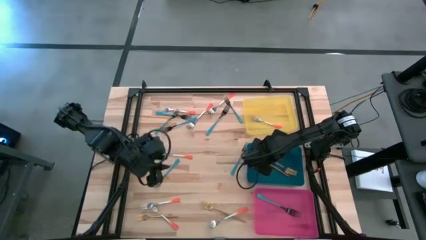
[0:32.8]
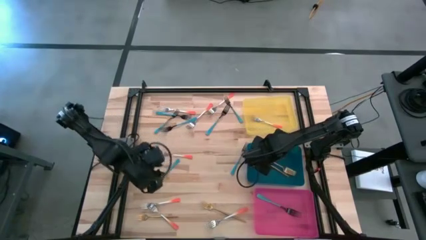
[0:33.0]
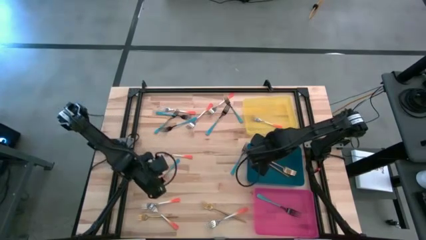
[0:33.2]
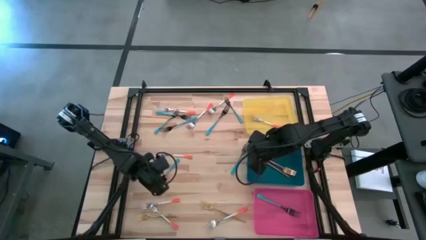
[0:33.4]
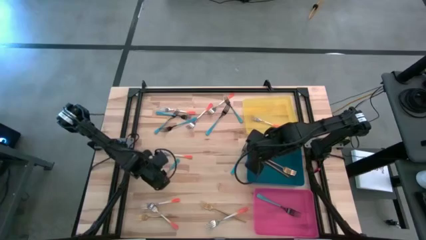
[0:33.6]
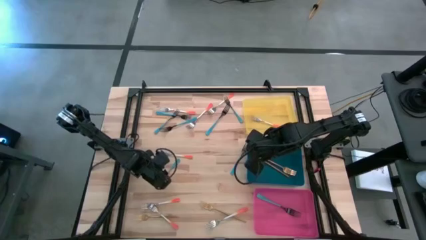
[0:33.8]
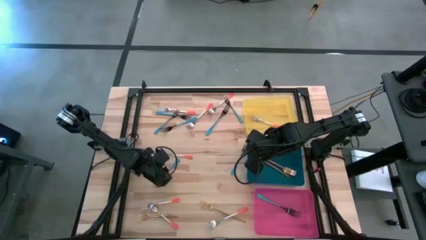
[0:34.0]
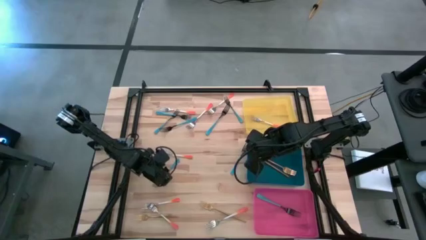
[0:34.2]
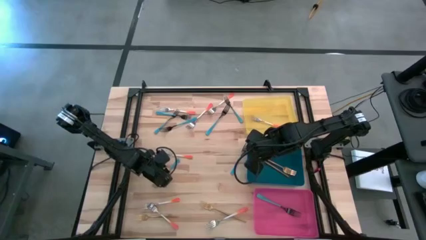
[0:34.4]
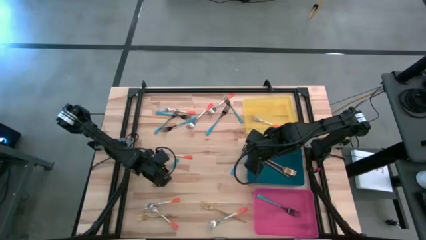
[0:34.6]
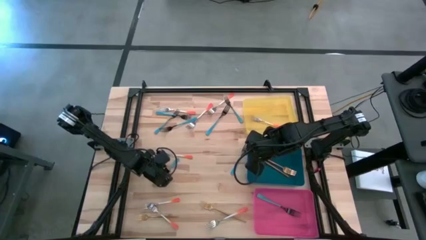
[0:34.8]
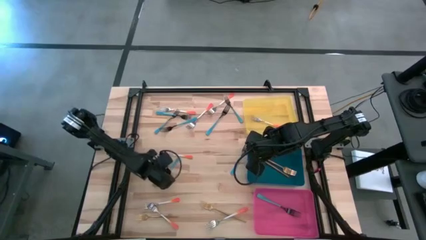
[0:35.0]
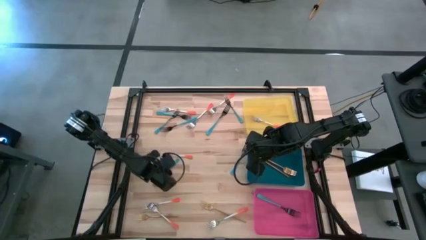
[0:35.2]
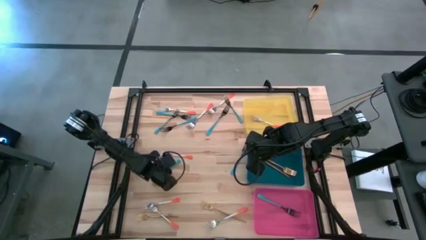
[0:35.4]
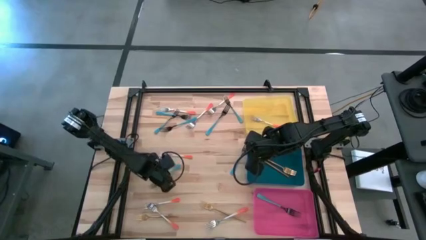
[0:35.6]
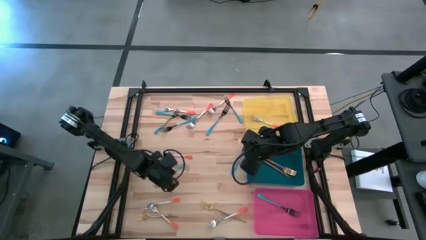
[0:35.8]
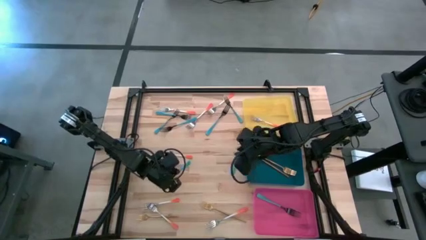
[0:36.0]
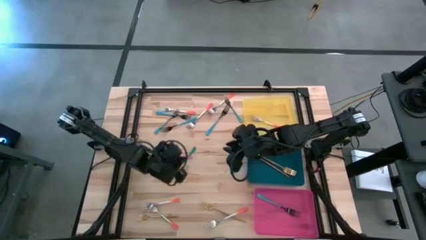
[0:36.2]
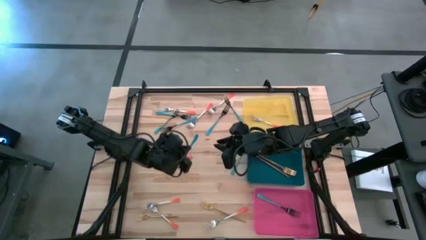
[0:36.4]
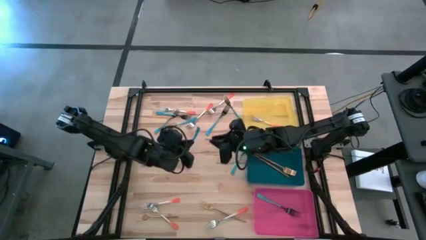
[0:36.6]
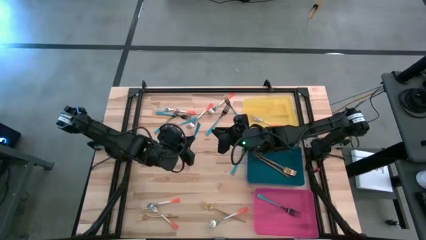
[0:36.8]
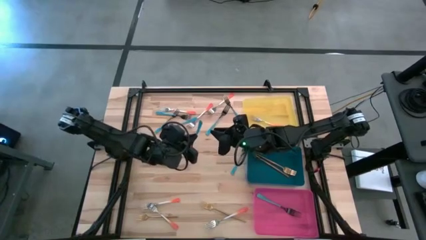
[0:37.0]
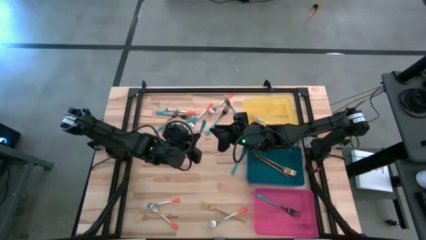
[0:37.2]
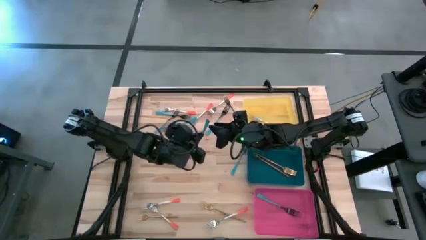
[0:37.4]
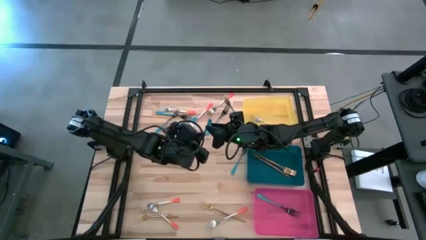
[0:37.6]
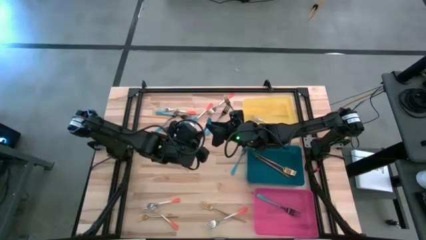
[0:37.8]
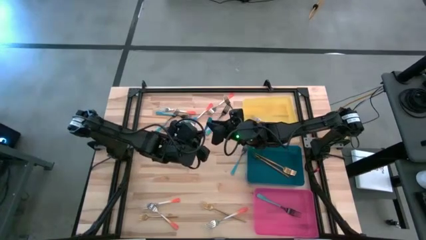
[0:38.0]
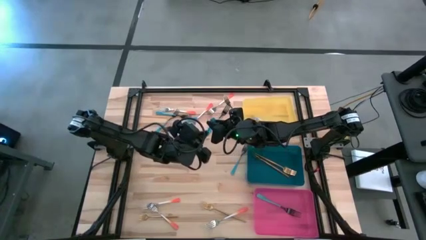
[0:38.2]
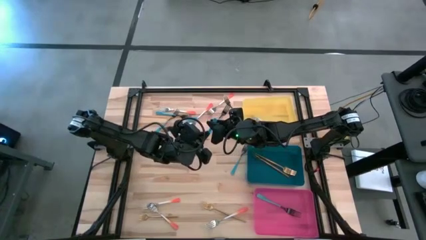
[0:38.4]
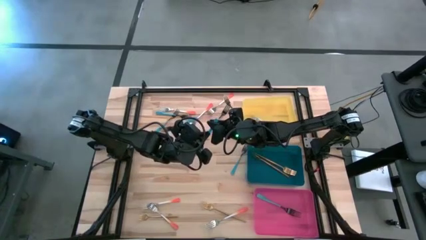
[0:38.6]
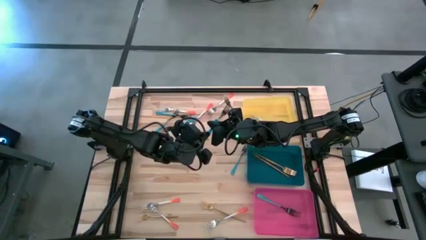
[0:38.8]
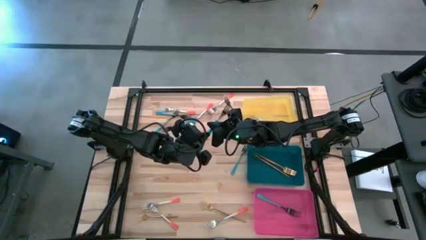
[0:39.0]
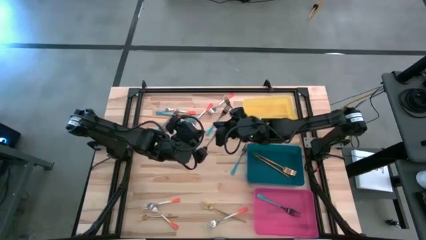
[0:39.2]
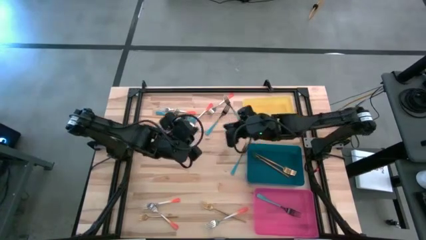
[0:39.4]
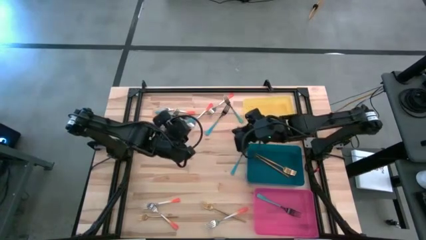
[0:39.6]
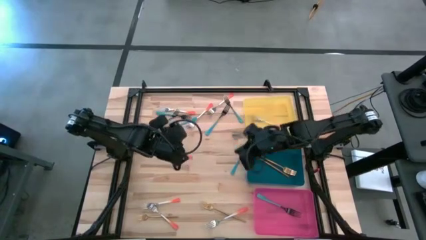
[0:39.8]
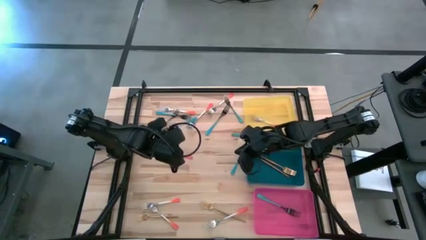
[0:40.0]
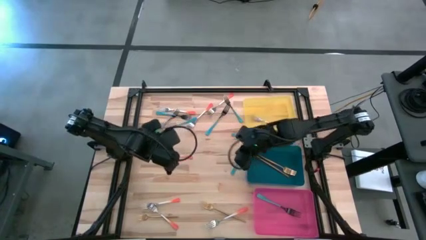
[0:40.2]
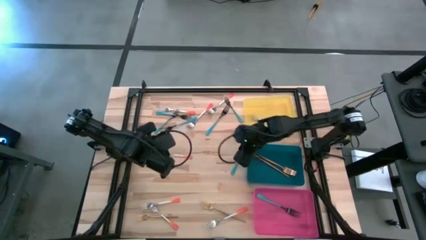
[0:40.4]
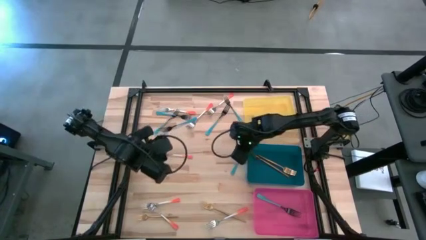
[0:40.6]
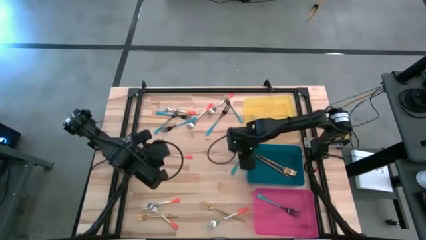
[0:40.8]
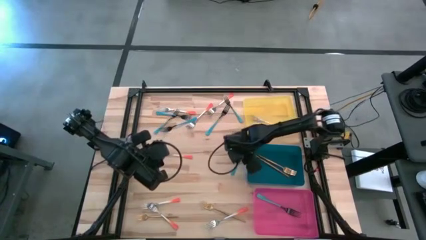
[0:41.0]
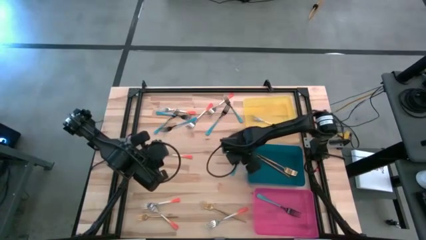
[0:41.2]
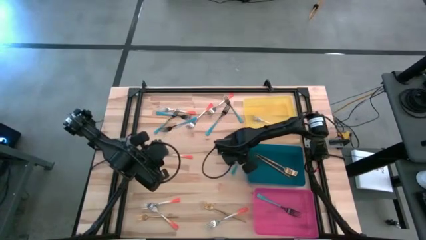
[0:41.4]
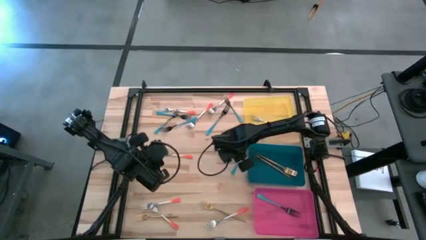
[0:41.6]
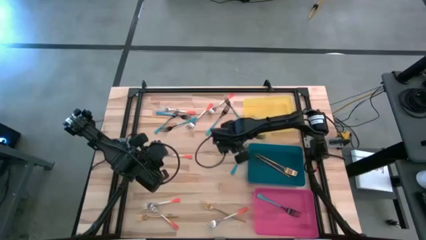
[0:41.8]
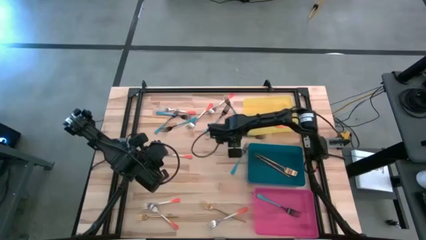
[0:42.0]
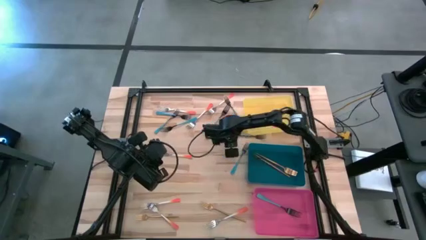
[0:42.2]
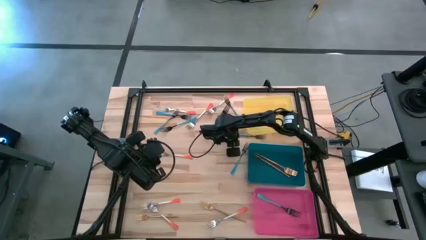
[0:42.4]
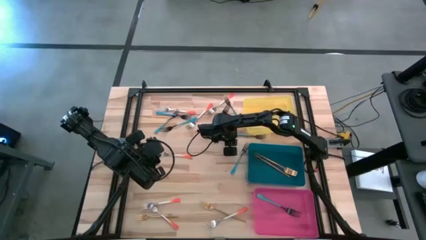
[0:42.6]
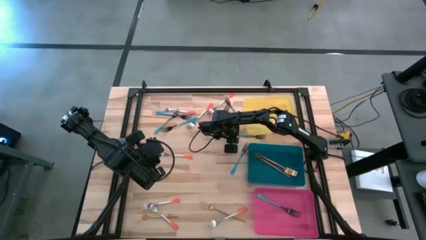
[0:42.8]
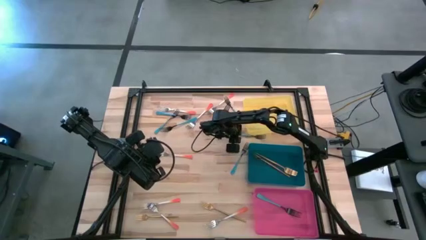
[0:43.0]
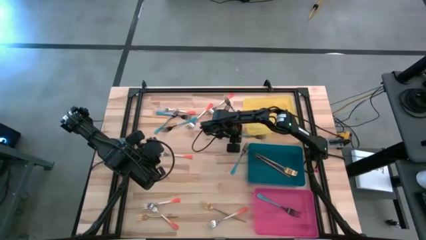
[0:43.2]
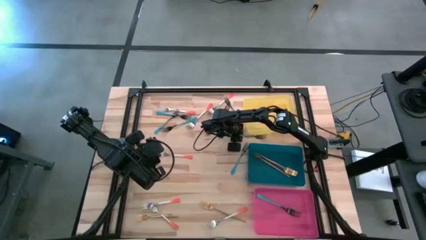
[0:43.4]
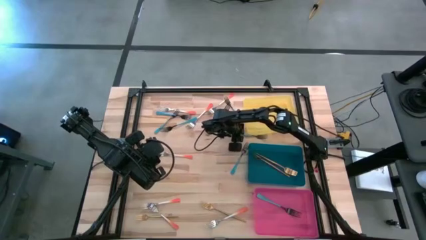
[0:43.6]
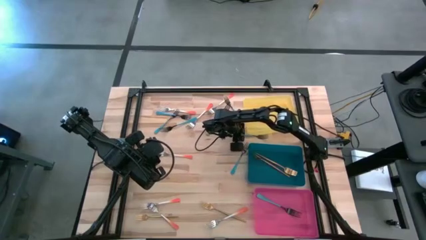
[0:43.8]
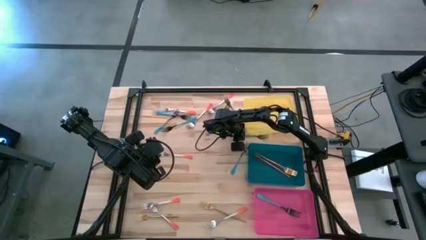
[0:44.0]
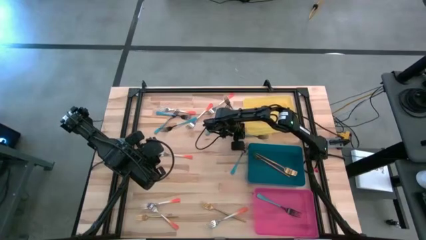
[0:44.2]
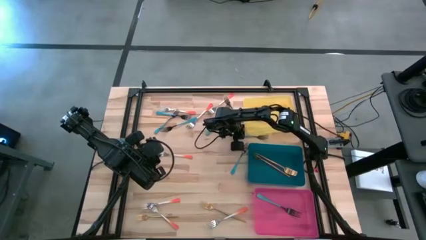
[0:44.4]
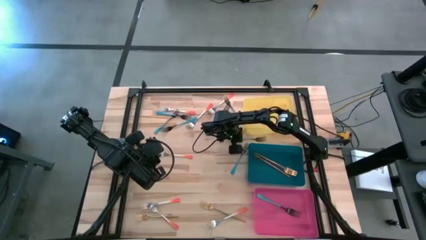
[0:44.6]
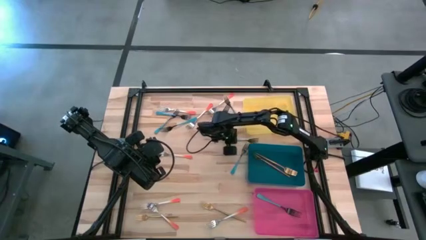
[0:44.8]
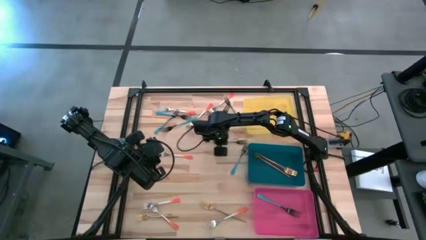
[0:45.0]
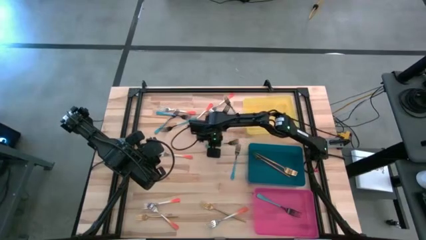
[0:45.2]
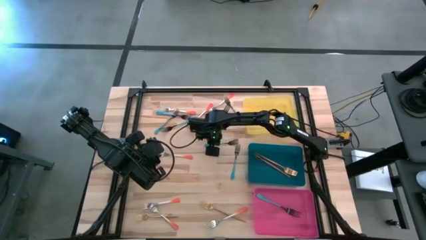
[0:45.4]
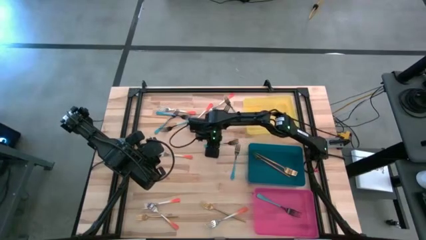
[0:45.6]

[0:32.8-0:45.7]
Task: Sort silverware by color (type)
Put the blue fork into the pink bin

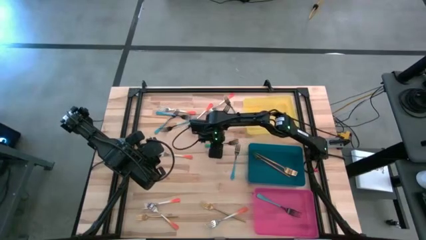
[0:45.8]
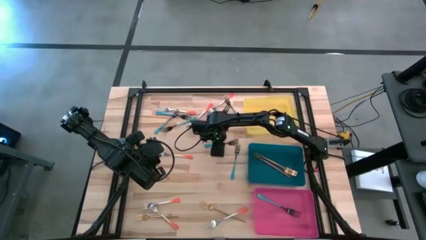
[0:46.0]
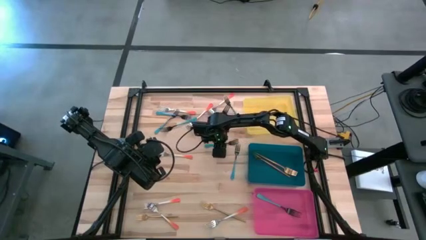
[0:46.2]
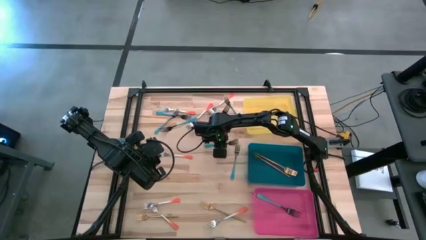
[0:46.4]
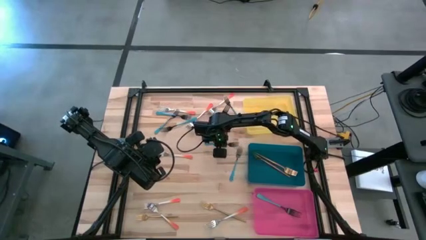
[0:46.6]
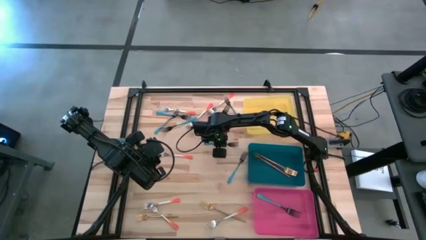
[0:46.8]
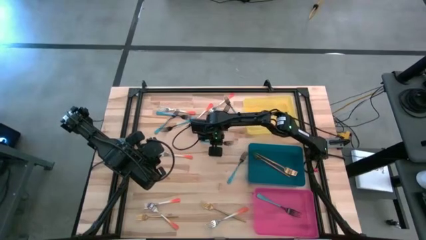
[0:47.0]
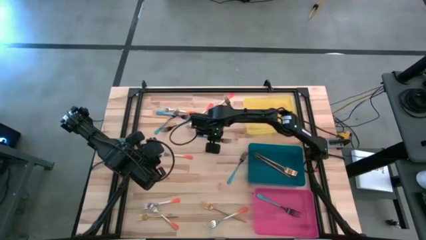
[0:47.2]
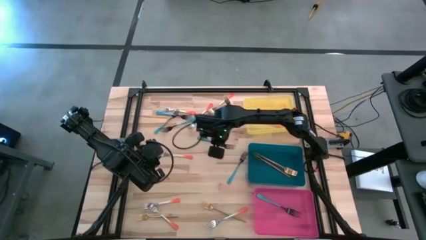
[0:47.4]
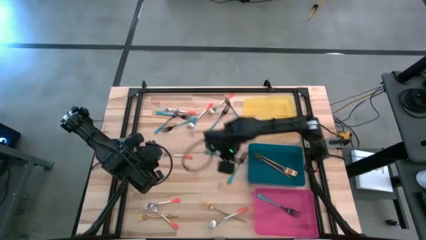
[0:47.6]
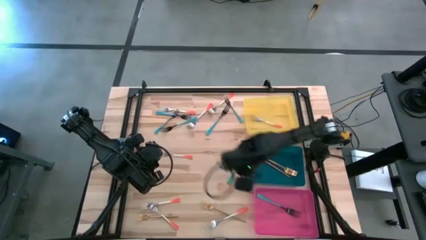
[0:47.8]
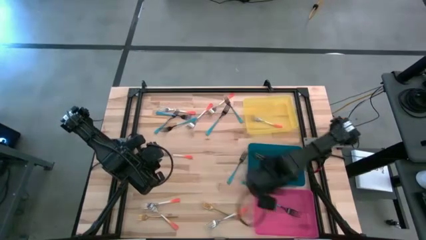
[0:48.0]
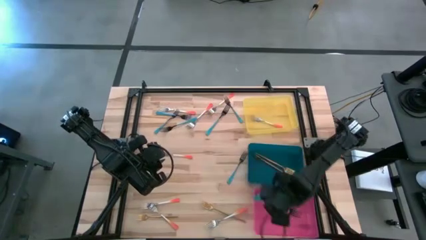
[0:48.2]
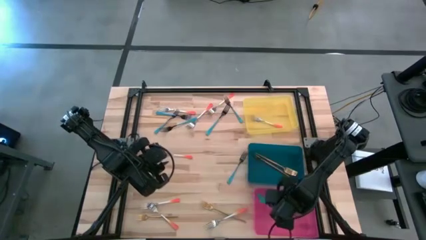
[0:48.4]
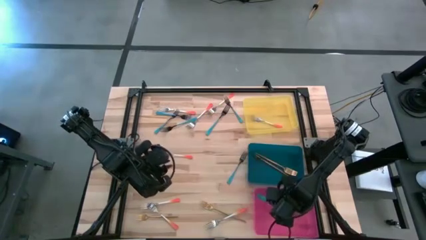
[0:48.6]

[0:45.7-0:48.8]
Put the blue fork into the pink bin
